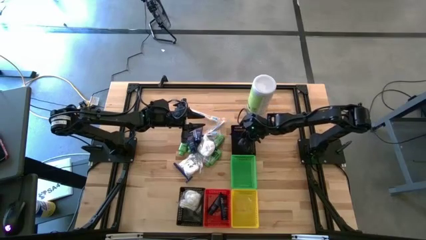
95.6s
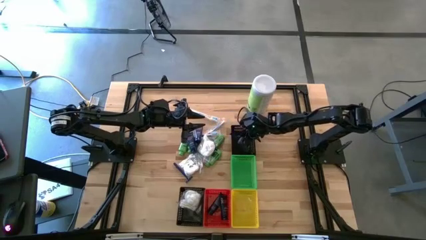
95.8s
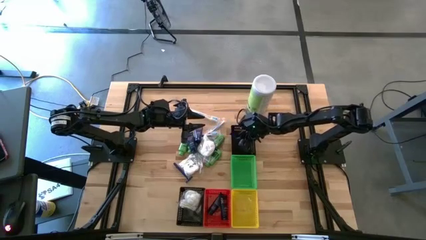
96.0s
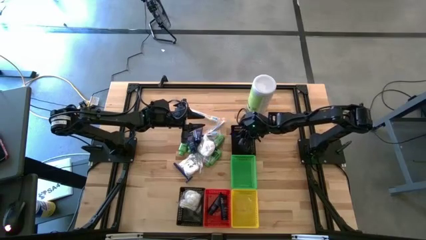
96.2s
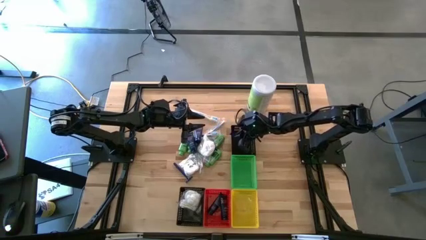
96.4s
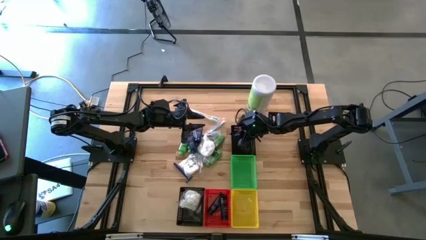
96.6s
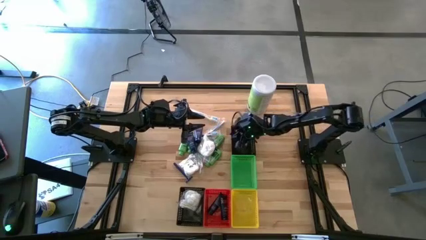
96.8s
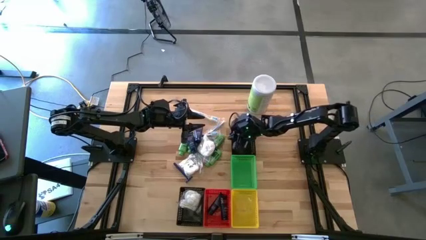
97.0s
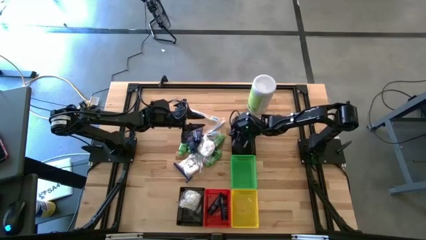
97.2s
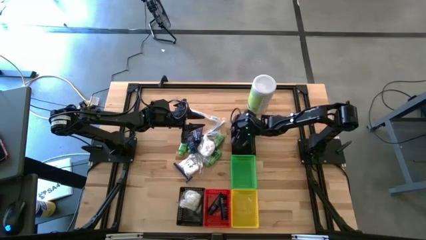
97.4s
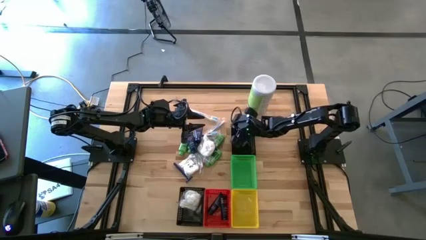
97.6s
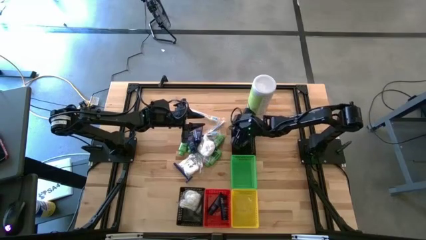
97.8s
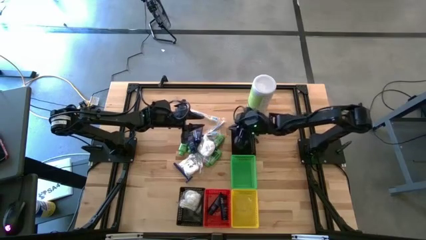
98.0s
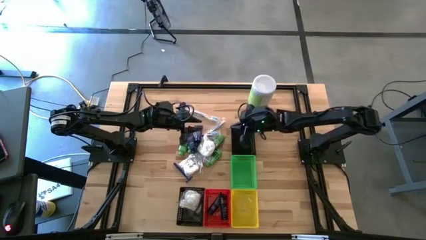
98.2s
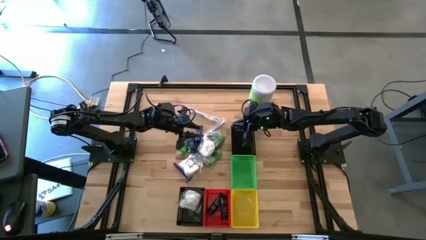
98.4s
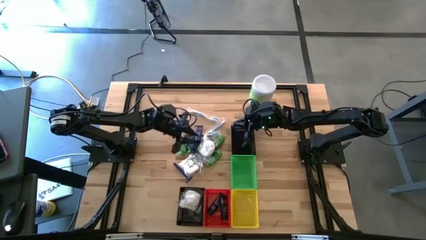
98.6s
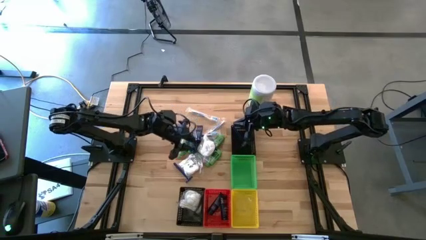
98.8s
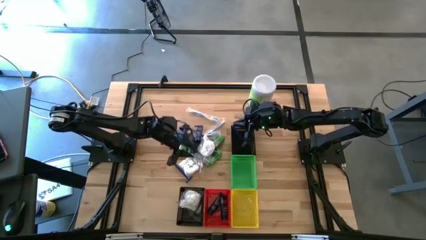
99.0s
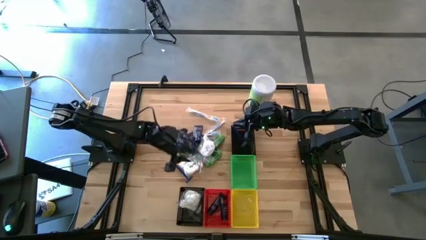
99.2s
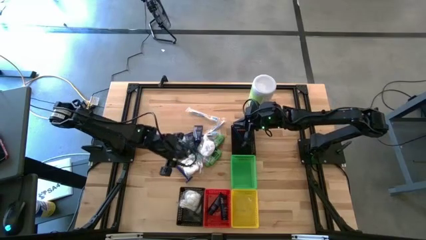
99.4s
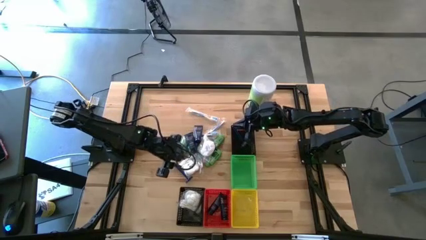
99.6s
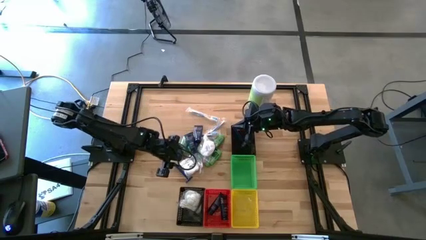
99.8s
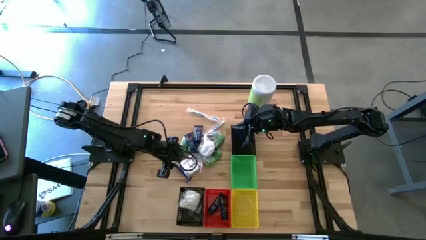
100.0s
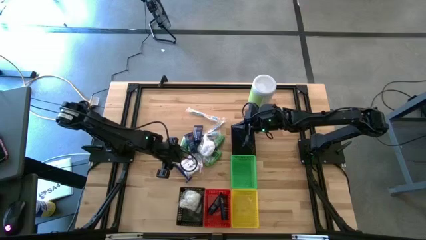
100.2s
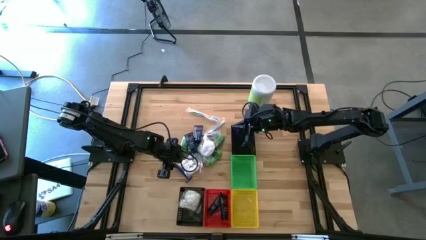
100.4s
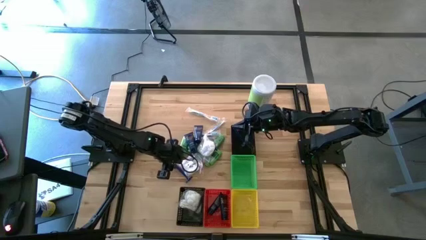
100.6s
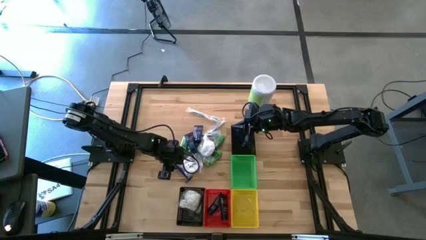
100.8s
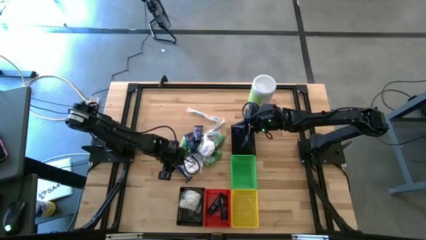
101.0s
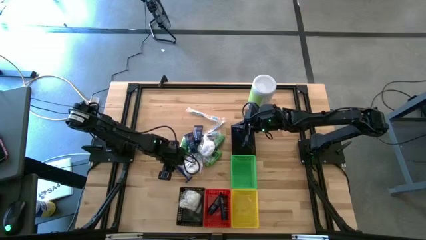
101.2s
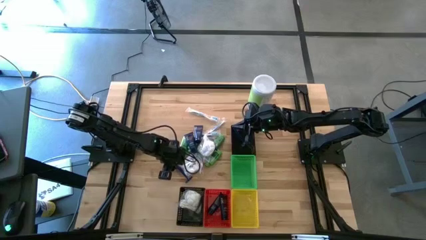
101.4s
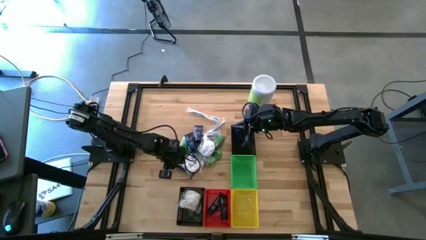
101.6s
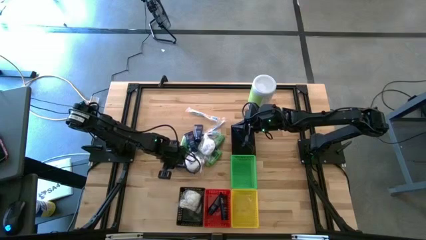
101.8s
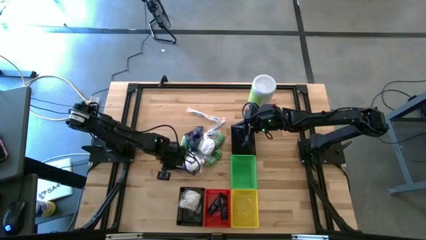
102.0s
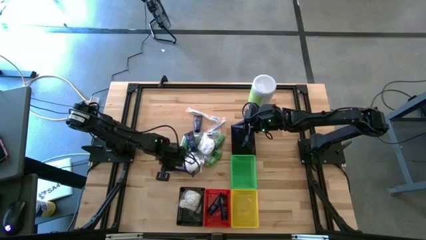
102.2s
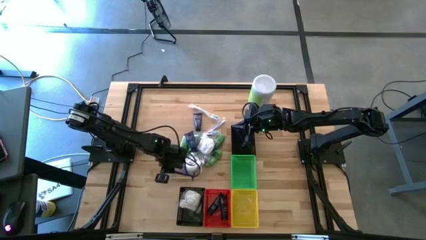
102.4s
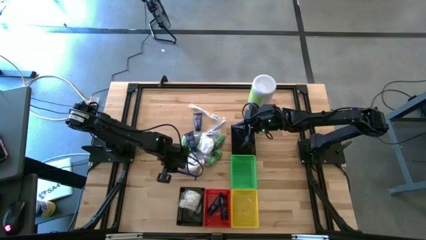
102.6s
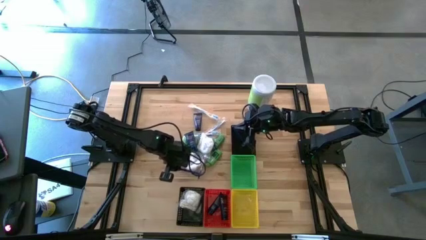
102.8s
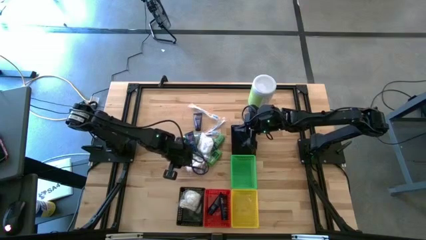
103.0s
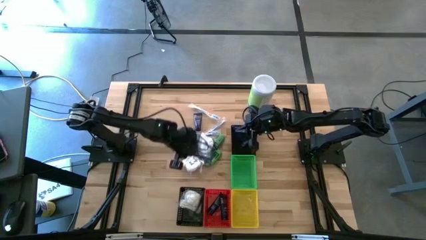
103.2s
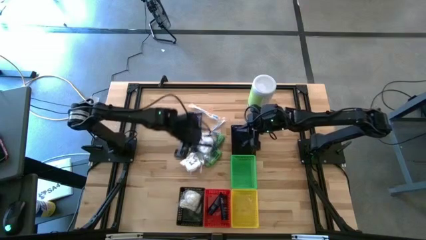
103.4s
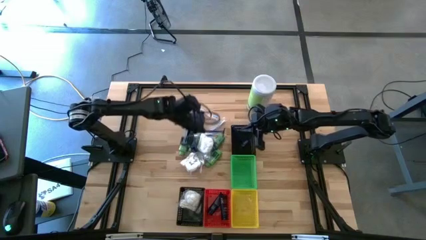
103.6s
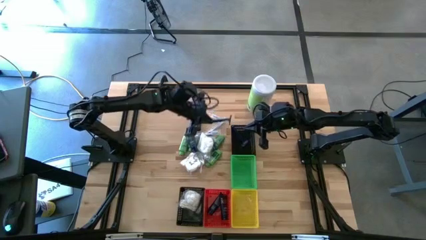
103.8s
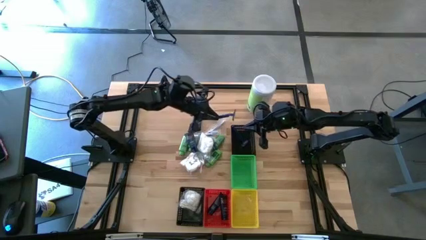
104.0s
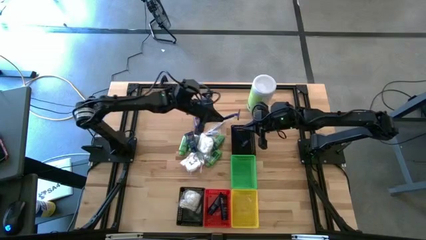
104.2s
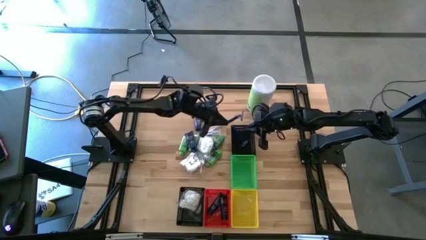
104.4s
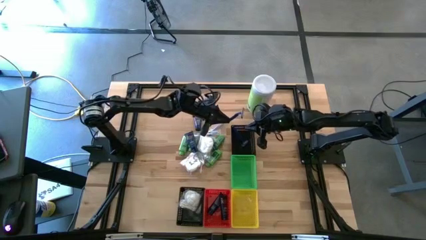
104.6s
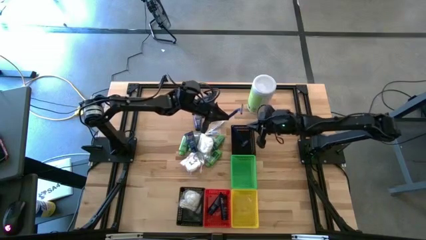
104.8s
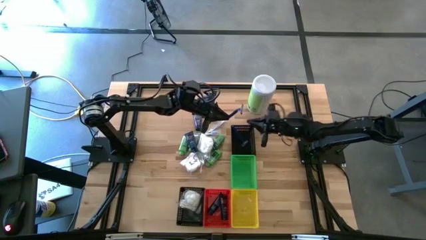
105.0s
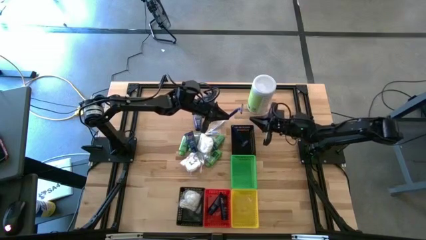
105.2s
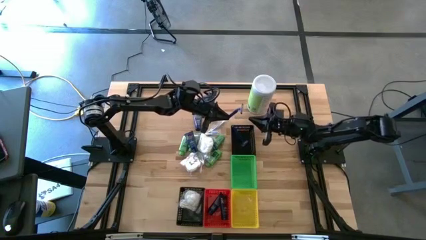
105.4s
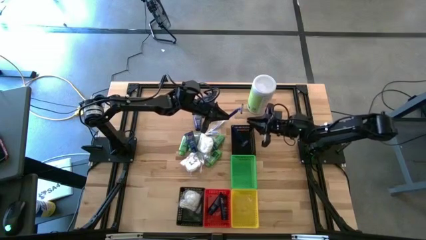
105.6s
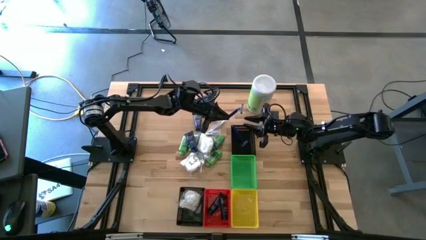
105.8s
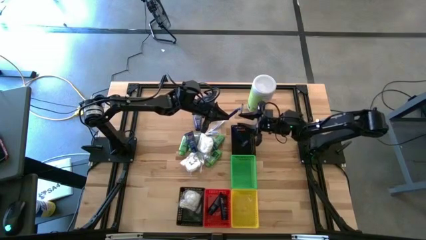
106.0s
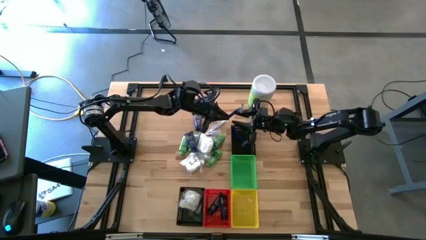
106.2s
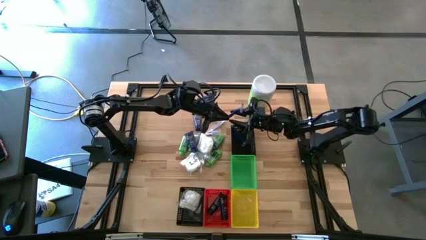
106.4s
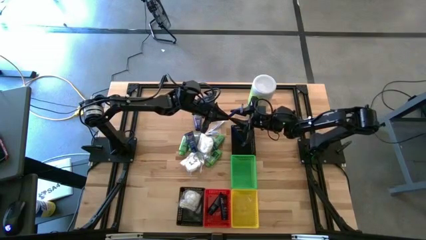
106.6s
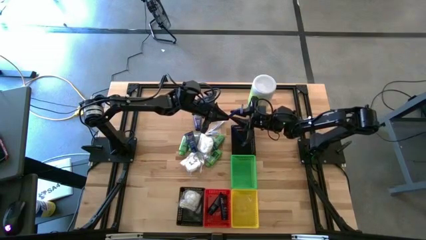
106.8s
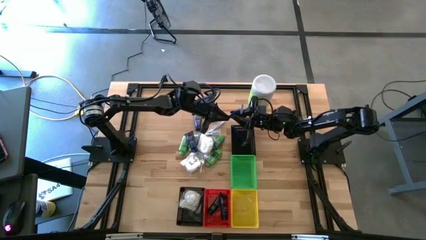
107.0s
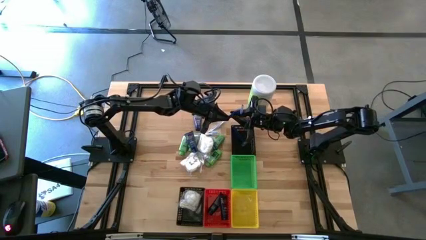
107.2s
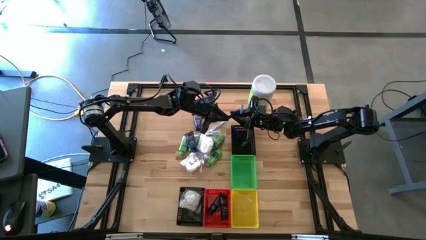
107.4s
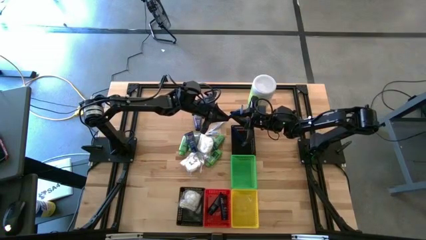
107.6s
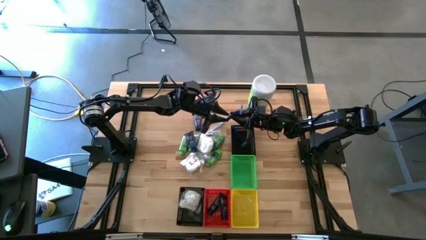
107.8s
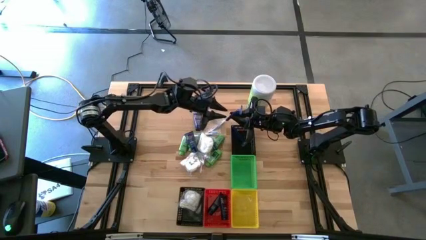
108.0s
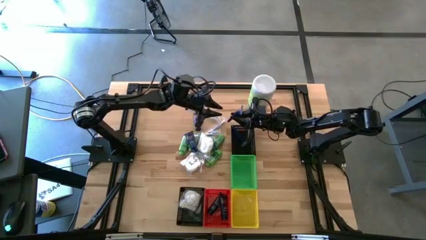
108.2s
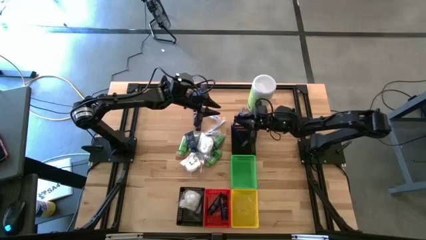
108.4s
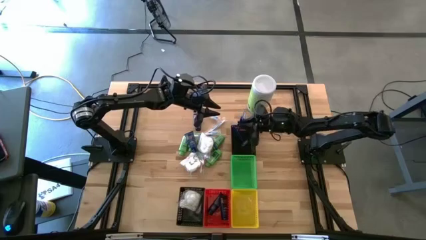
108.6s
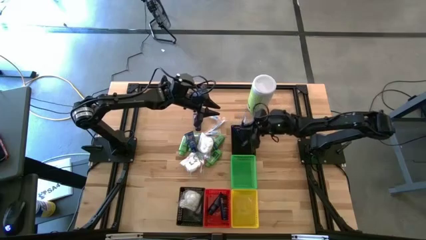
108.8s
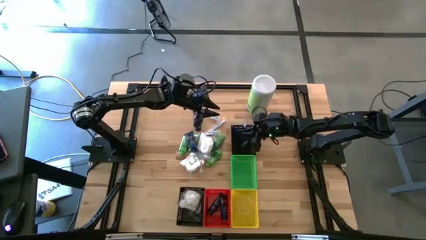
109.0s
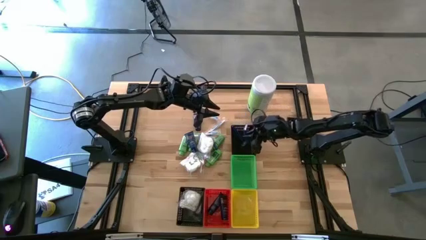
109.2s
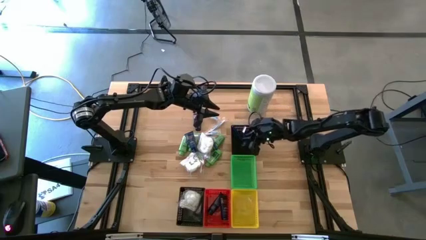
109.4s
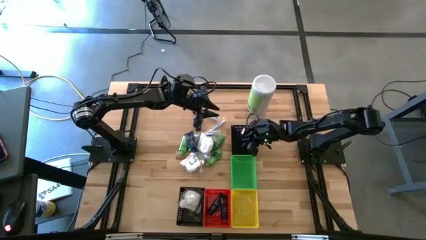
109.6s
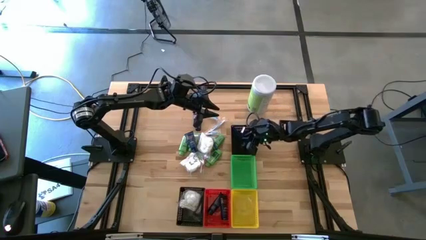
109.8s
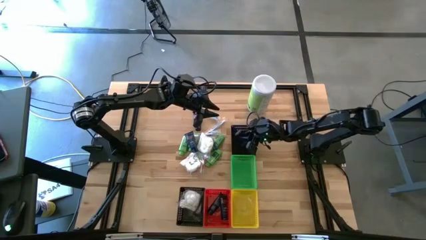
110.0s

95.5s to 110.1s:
Task: Pick & Place Travel size toiletries
Put the razor into the top black bin

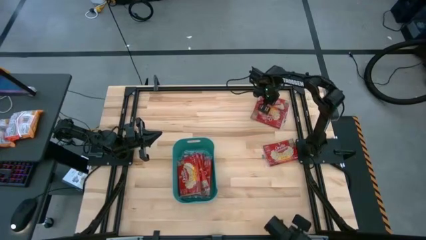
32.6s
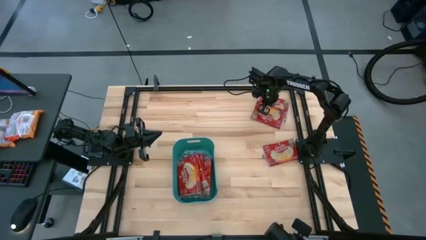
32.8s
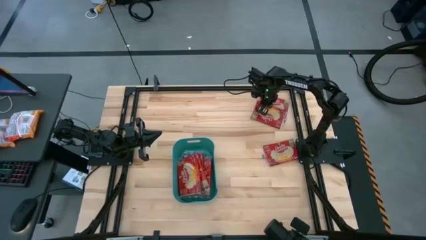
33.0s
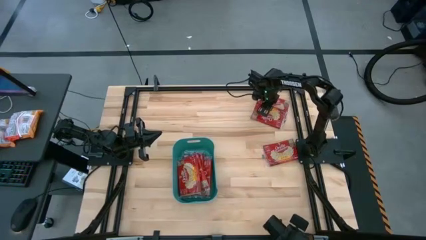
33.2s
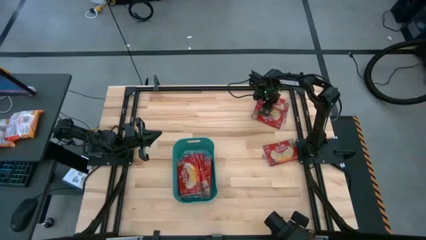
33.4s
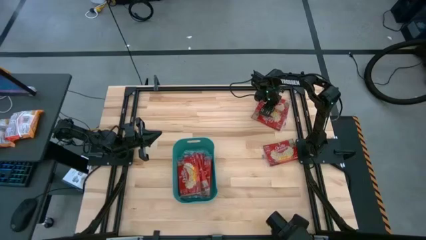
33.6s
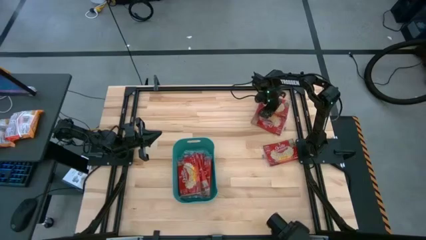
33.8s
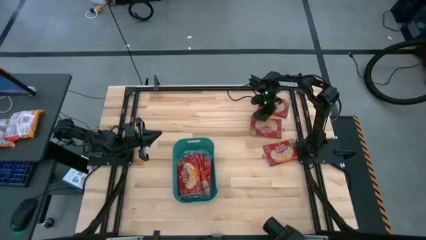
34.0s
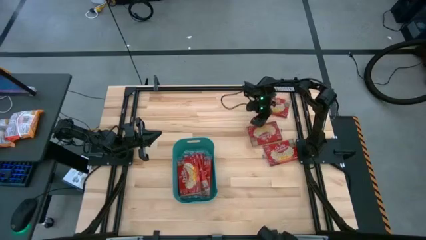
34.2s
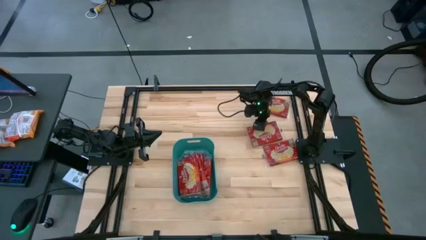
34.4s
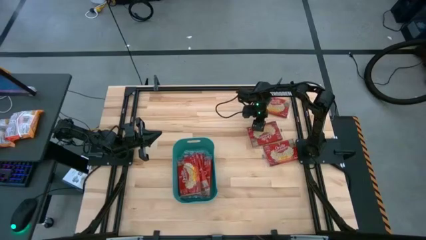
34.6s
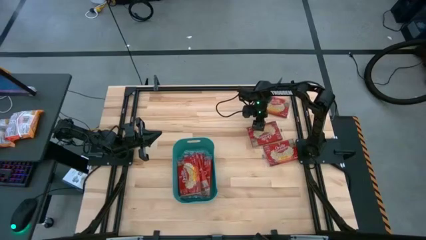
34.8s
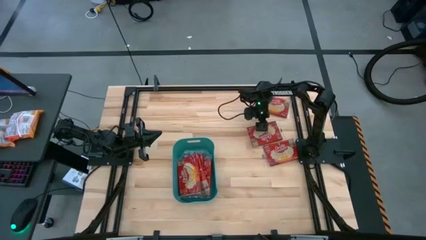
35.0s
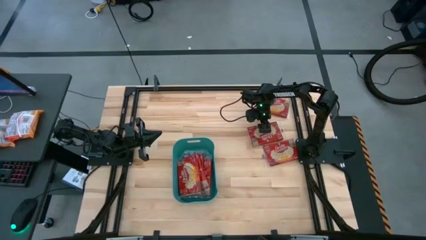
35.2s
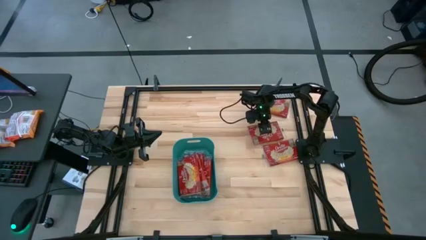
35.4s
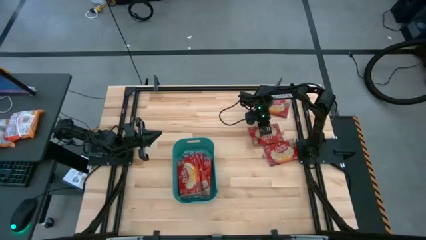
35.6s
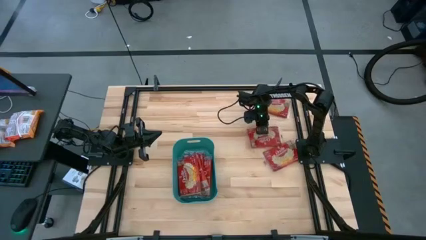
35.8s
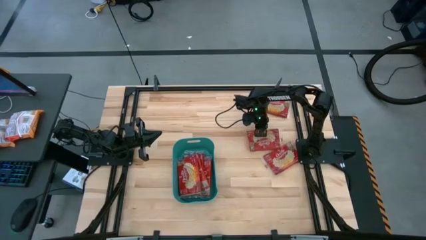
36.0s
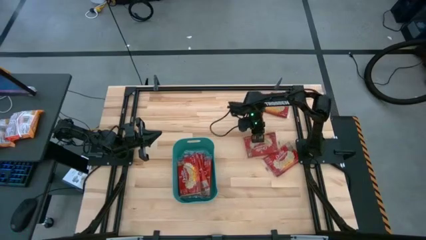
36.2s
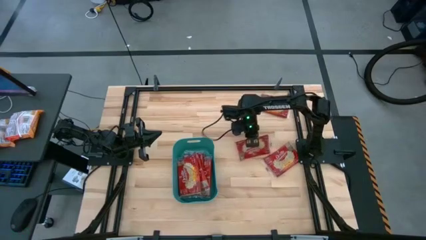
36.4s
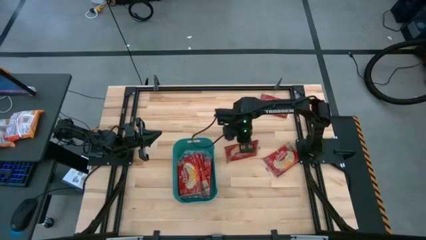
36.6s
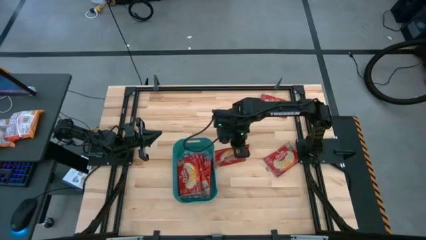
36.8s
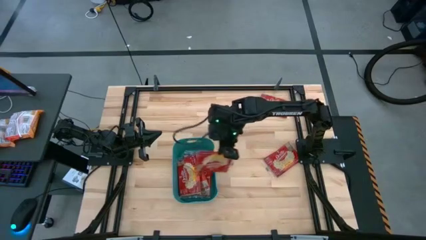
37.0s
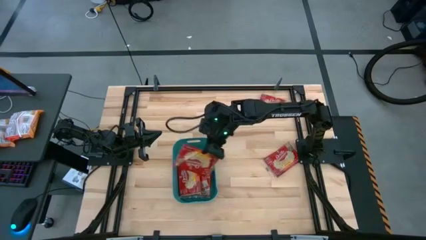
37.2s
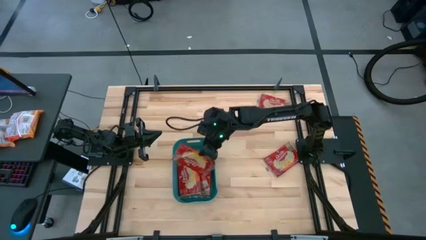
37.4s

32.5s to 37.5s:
Task: Sort popcorn bags into baskets
Put the red popcorn bag into the green bin
